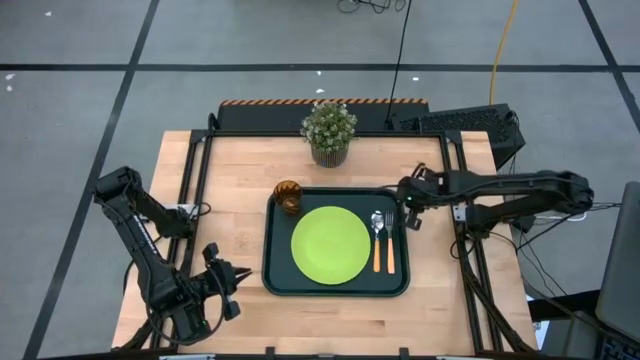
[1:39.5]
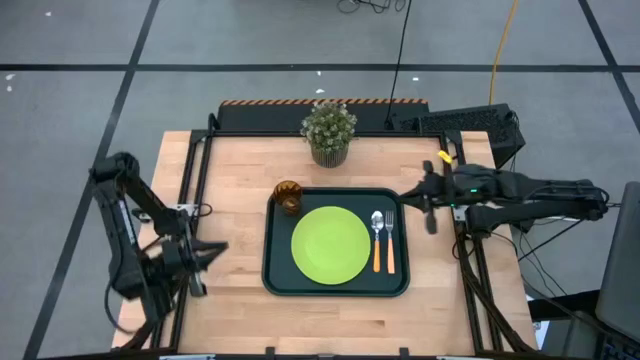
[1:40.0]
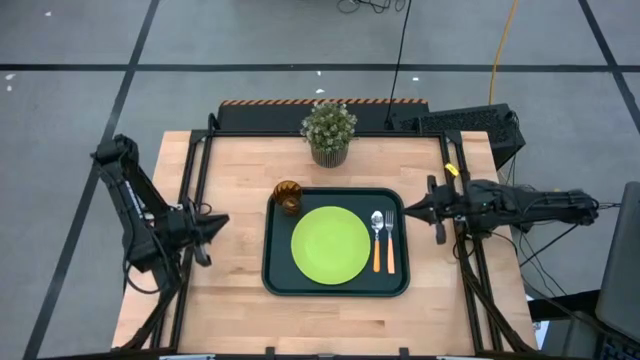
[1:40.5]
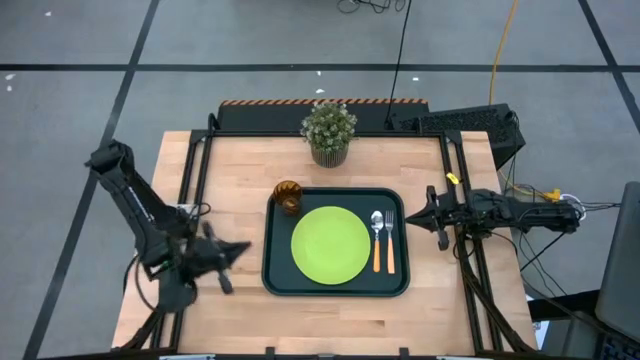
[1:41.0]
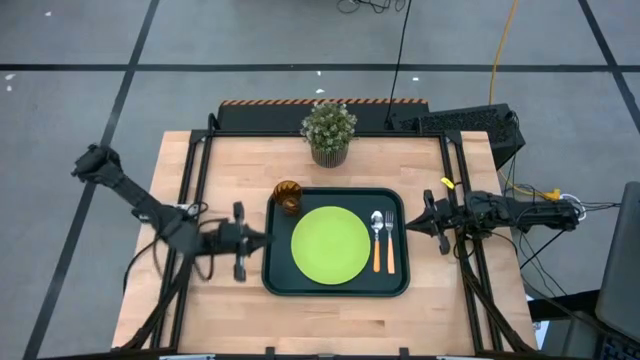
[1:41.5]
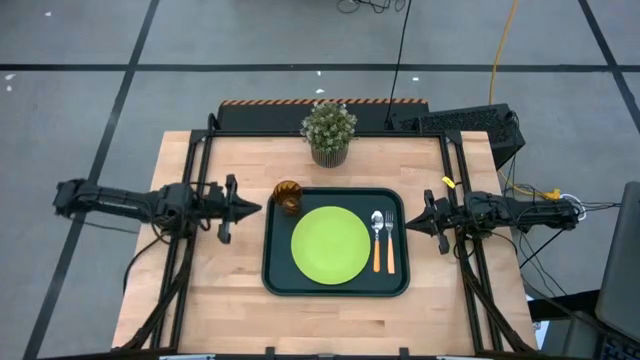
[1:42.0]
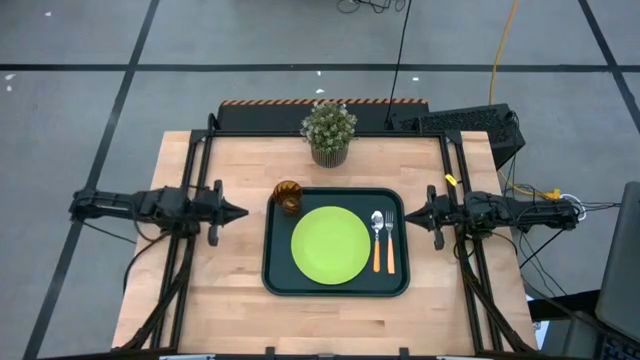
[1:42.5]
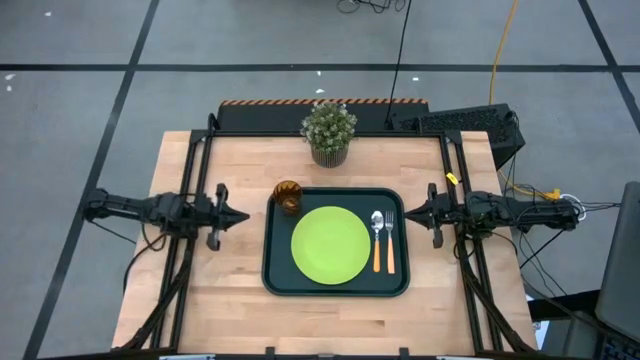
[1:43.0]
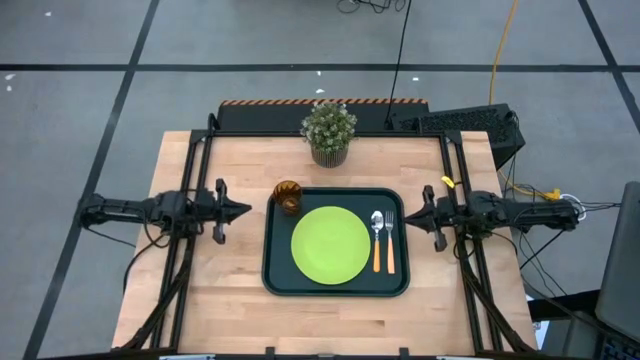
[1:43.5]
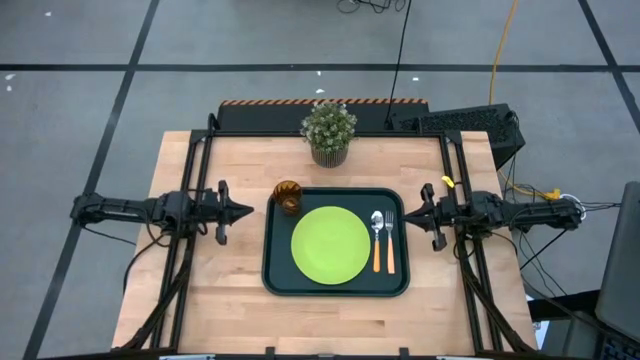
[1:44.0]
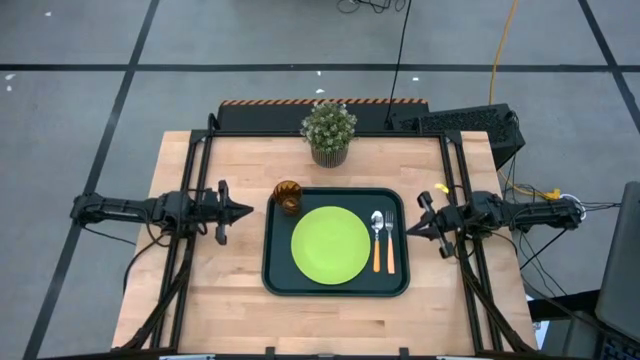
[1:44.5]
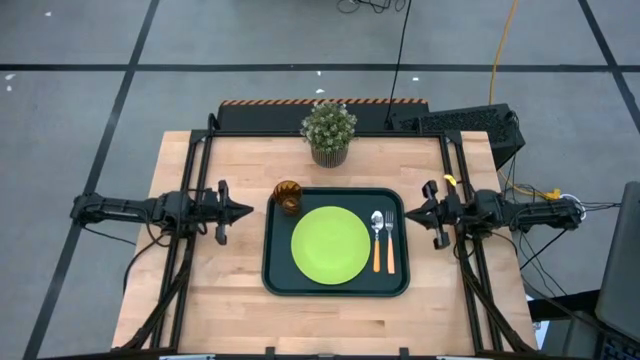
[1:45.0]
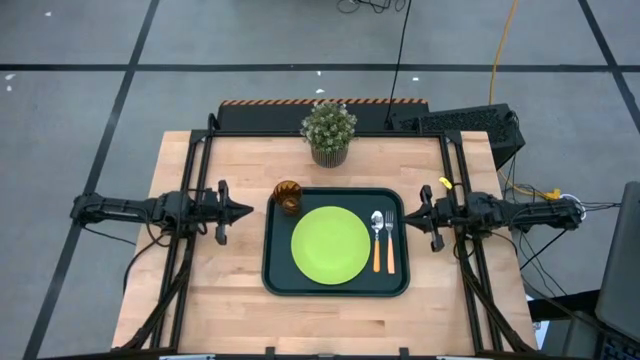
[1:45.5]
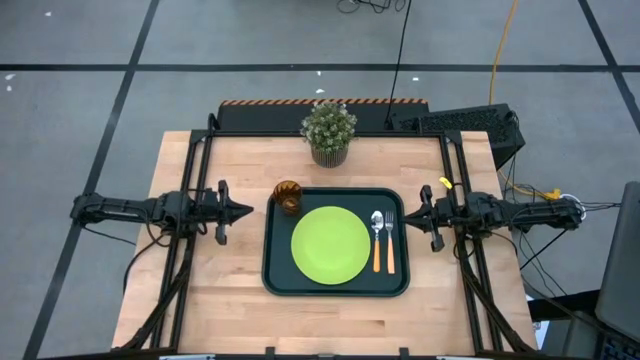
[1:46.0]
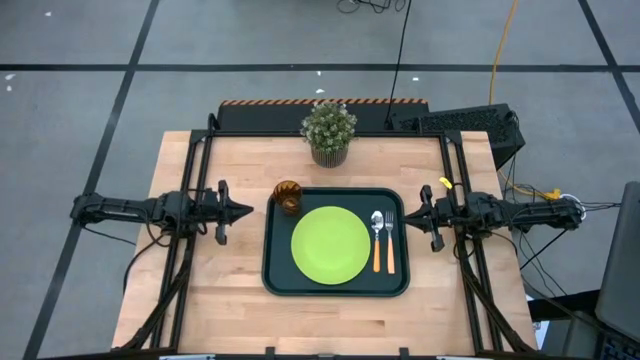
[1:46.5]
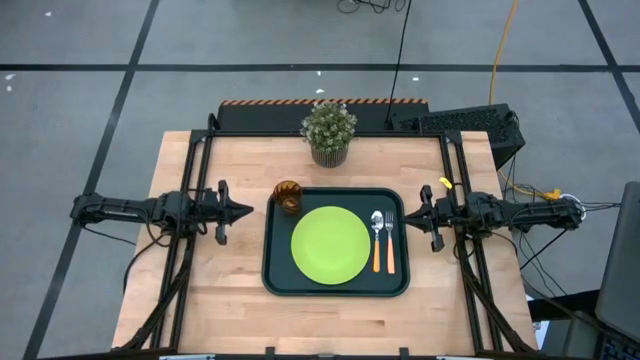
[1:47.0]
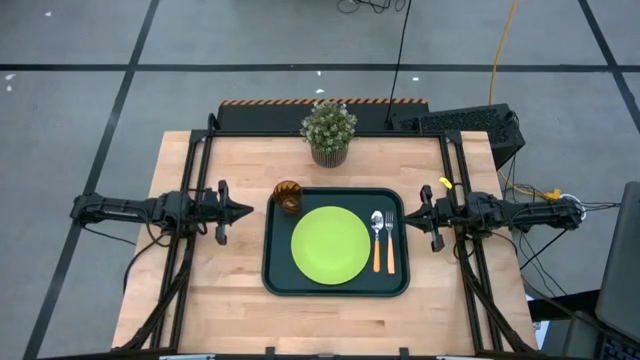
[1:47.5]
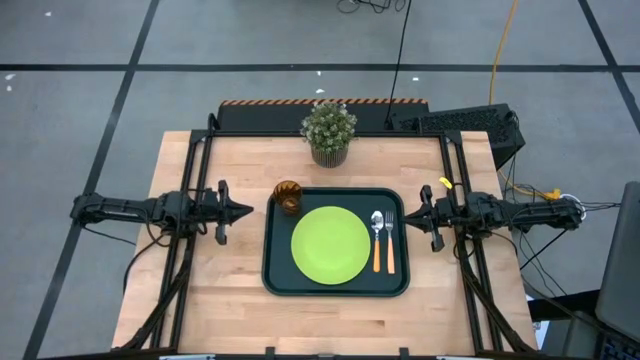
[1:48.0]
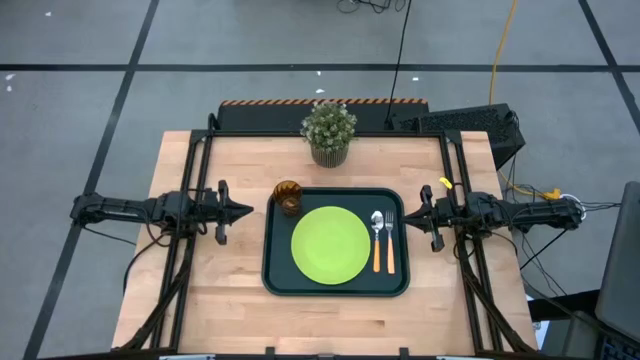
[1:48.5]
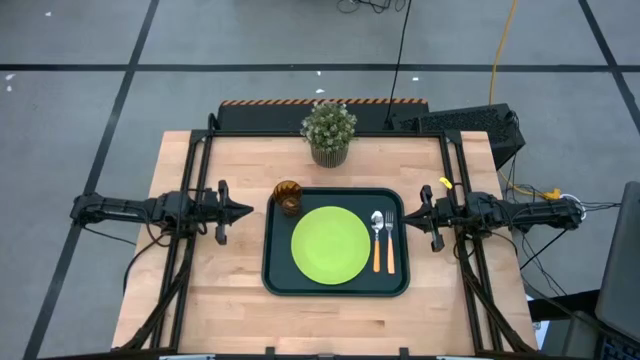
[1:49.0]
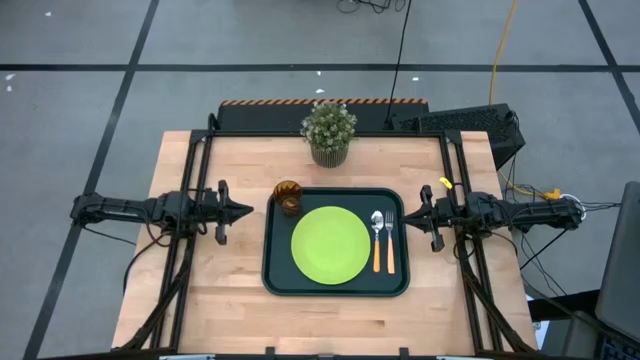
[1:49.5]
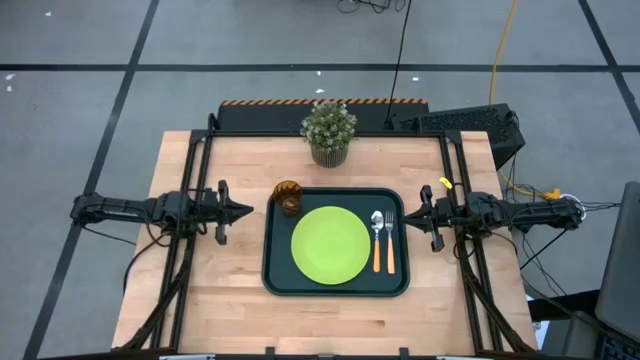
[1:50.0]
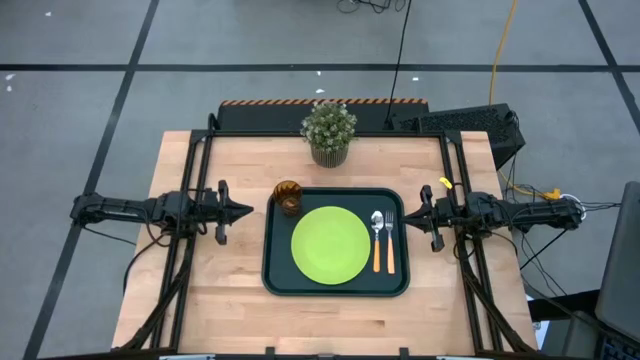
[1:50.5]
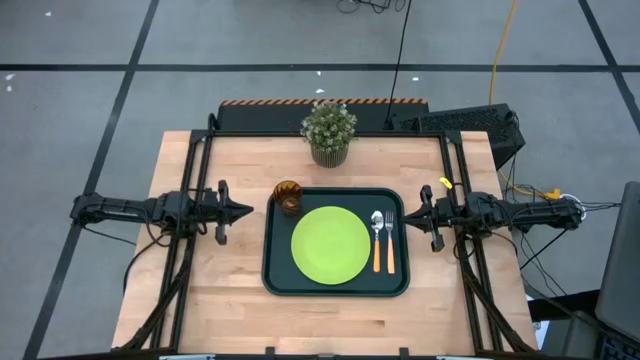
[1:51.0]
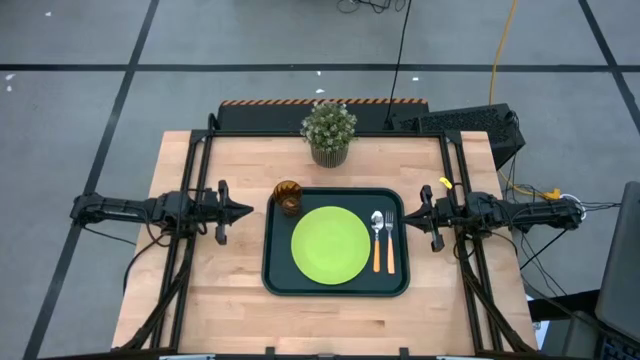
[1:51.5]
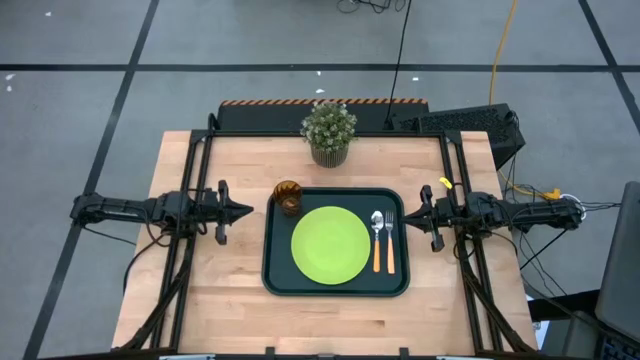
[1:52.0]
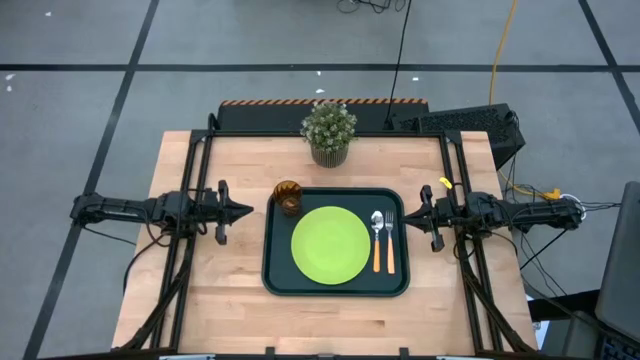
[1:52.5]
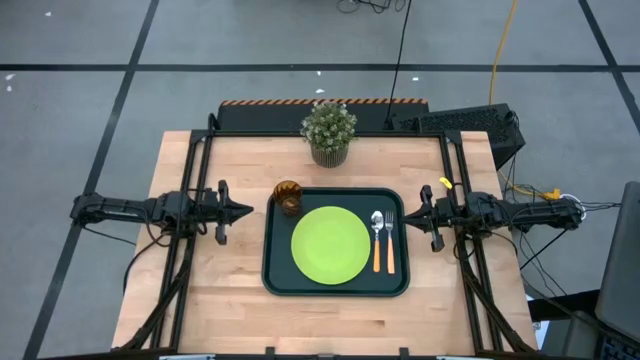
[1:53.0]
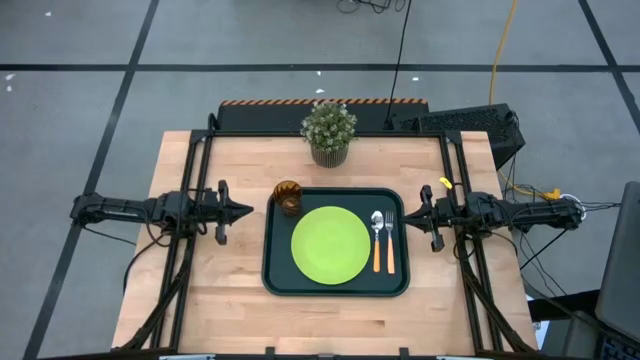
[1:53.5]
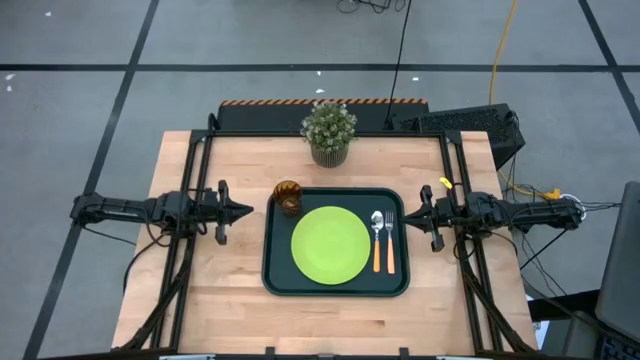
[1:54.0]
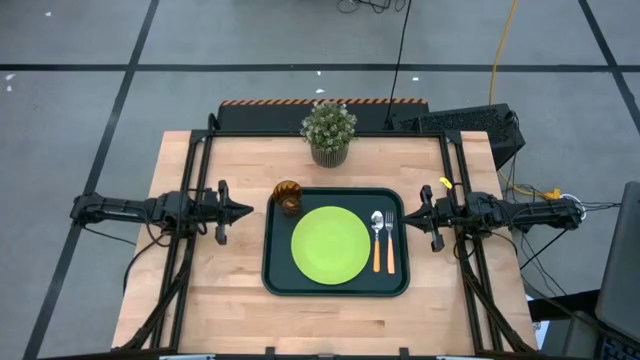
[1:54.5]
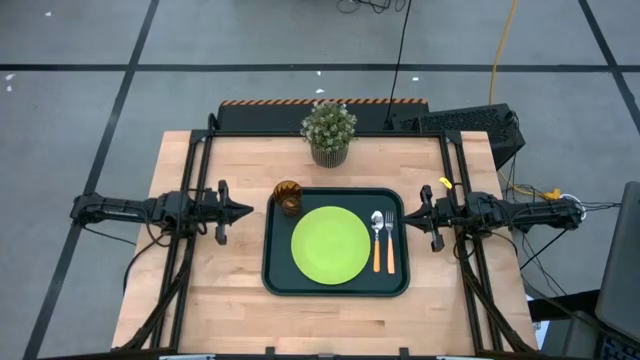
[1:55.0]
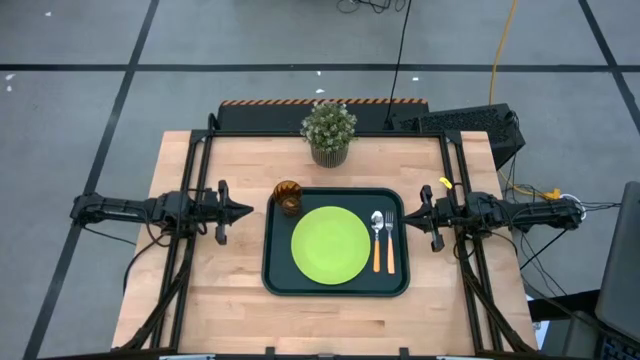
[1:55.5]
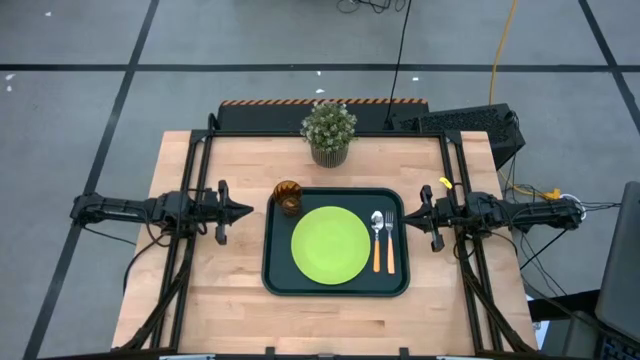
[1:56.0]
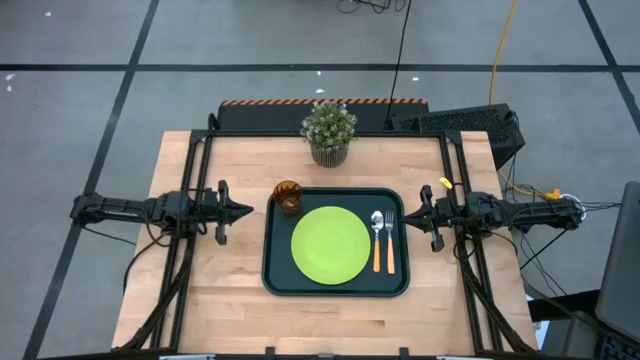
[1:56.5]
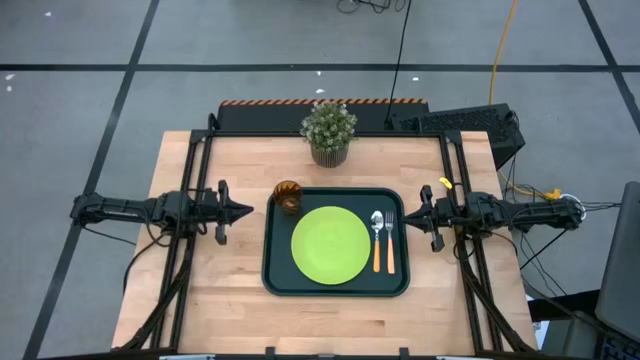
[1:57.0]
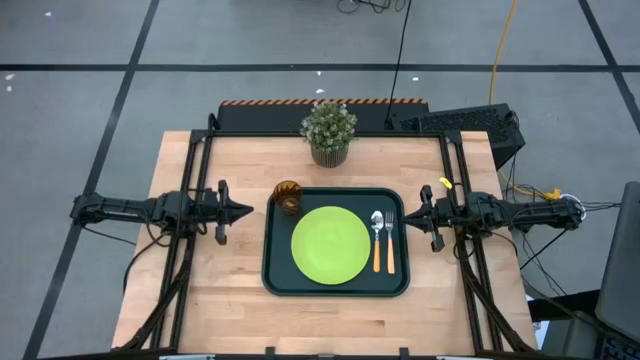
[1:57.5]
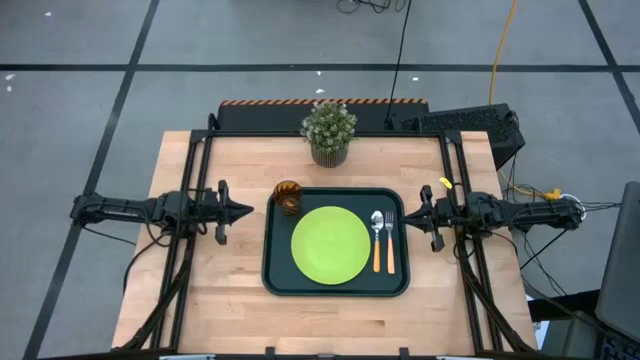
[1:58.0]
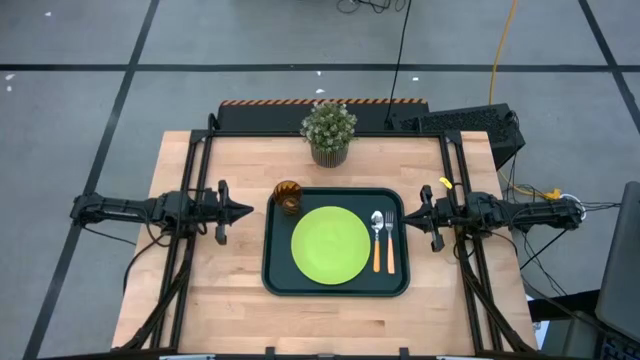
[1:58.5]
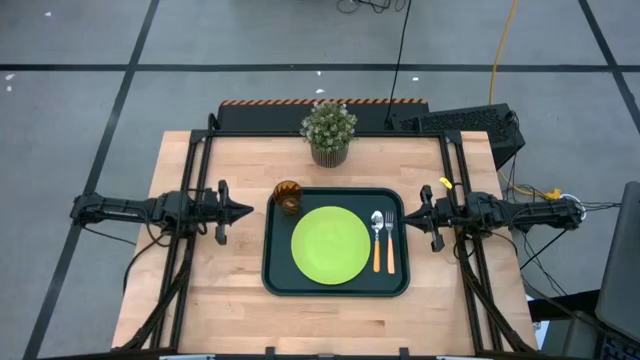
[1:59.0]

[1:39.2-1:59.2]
Task: Pick and place plate/cup/fork/spoon on tray
Return to Home Position
